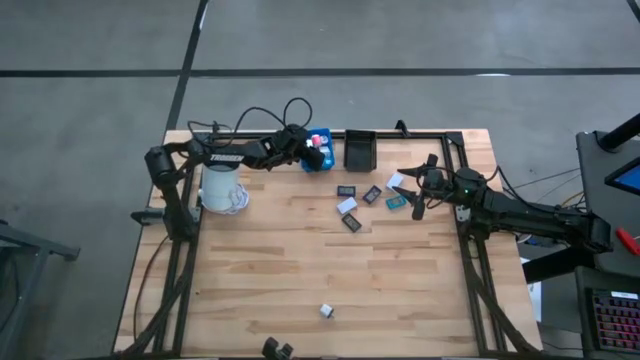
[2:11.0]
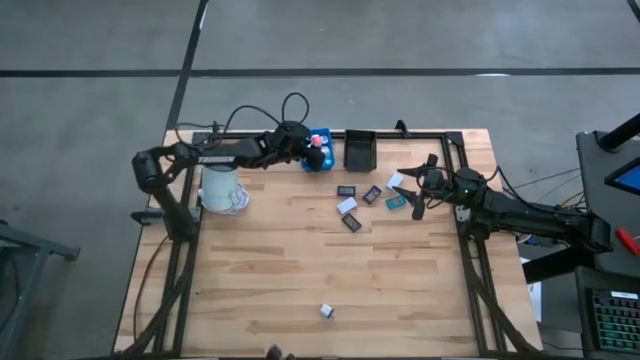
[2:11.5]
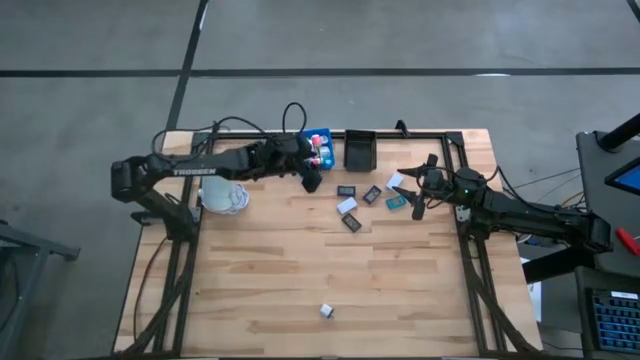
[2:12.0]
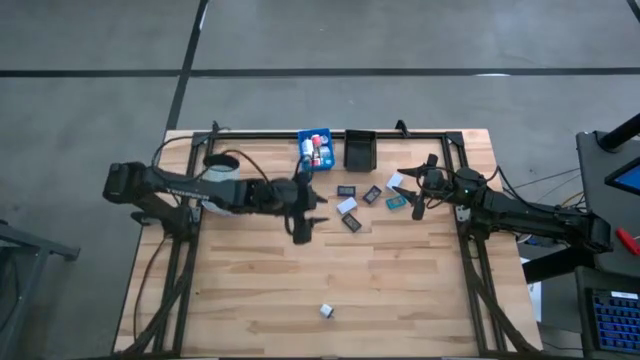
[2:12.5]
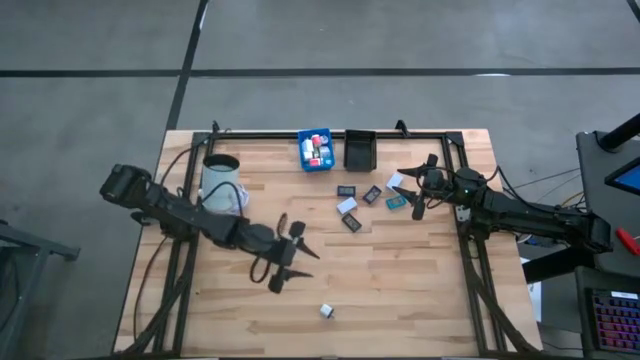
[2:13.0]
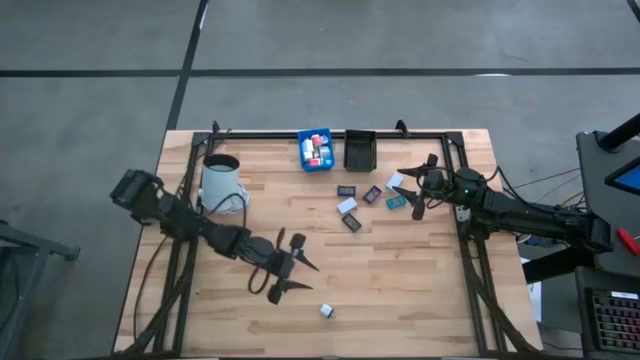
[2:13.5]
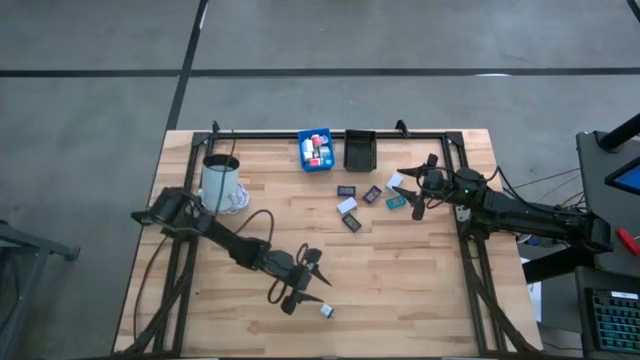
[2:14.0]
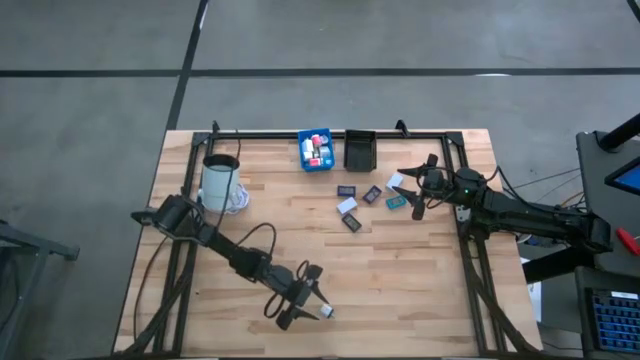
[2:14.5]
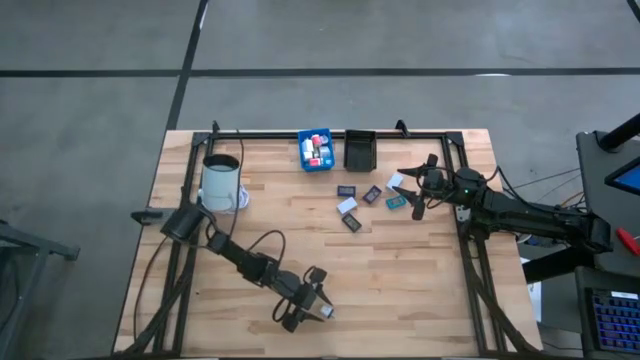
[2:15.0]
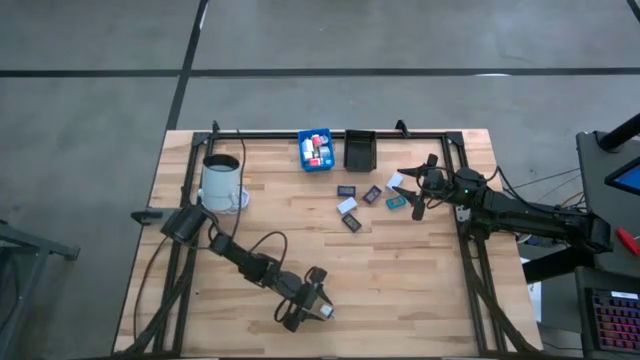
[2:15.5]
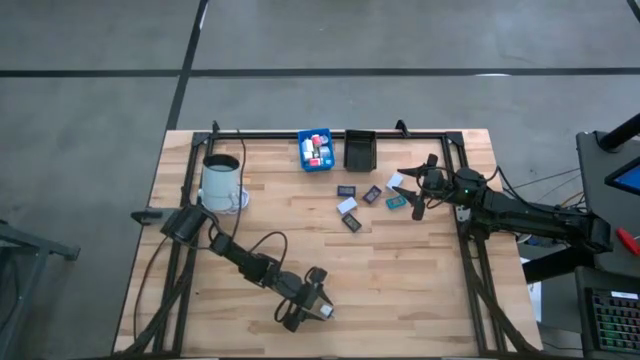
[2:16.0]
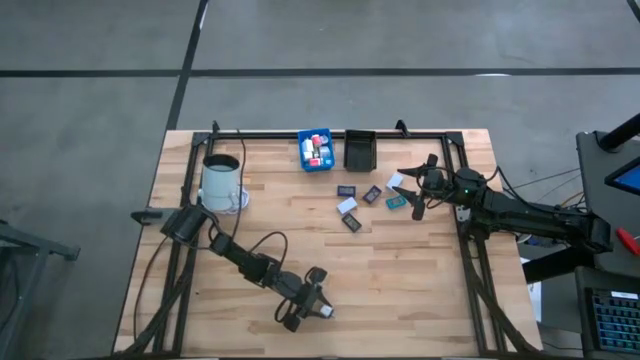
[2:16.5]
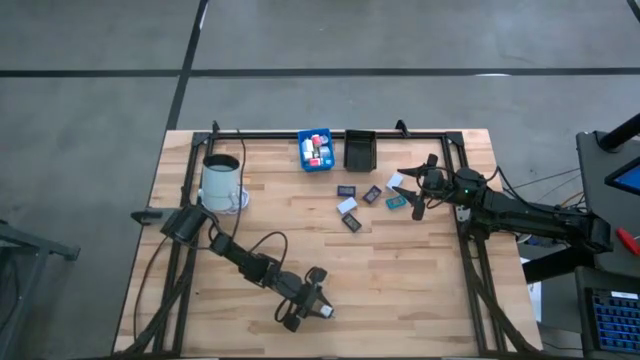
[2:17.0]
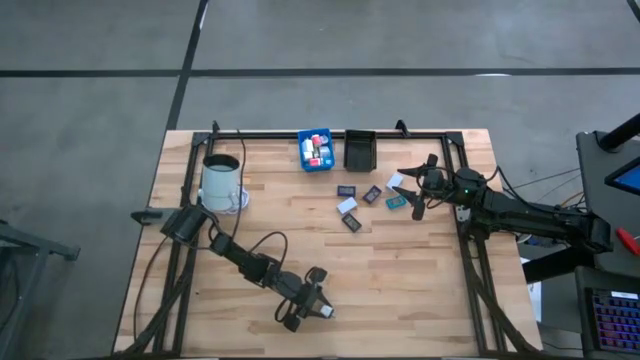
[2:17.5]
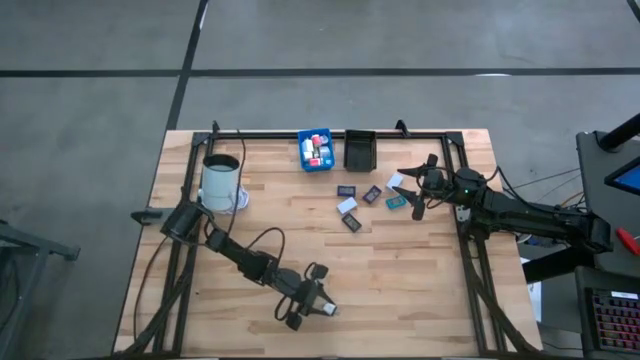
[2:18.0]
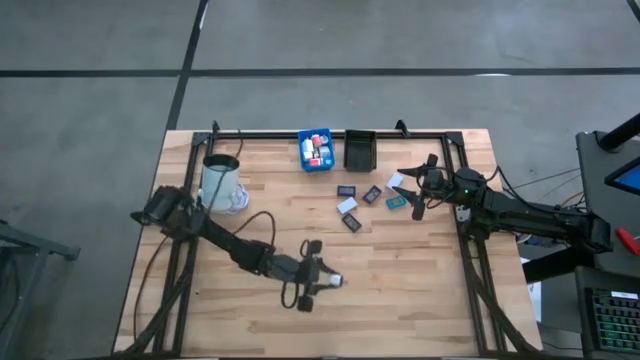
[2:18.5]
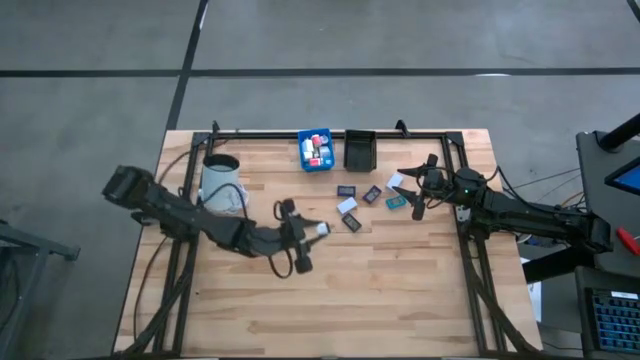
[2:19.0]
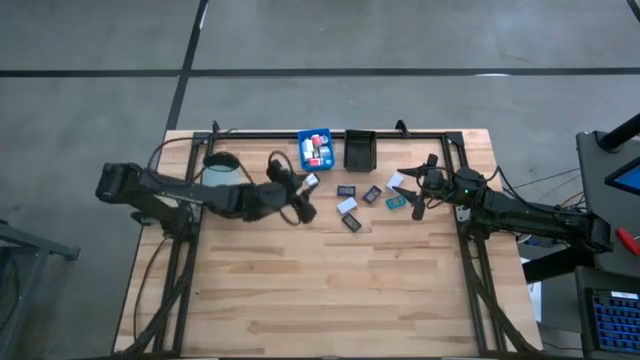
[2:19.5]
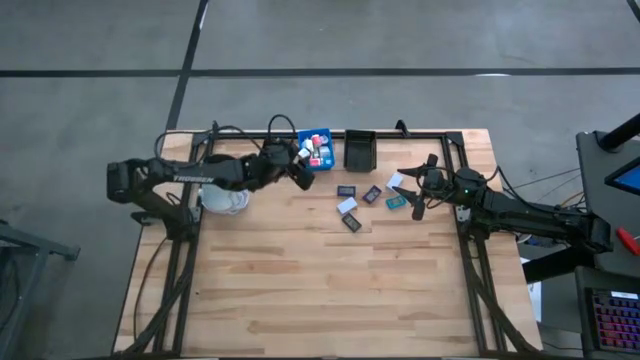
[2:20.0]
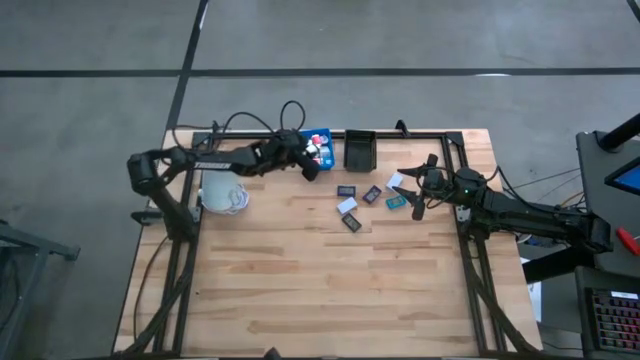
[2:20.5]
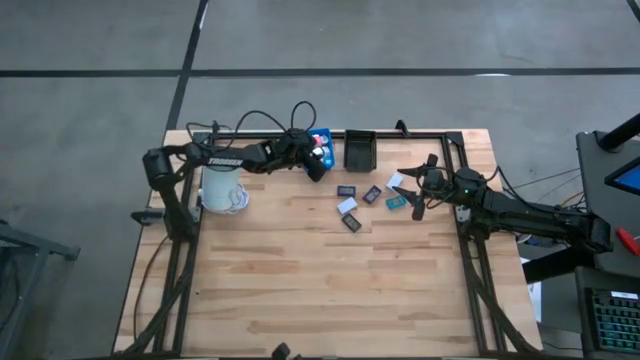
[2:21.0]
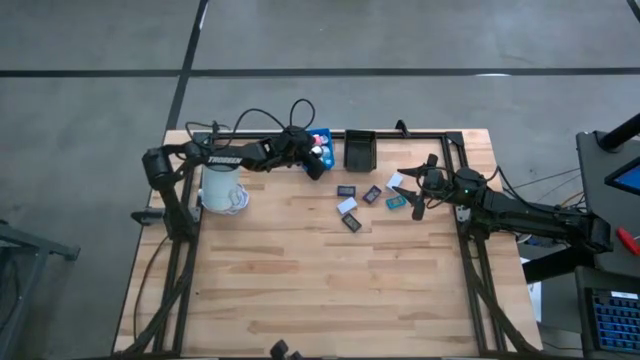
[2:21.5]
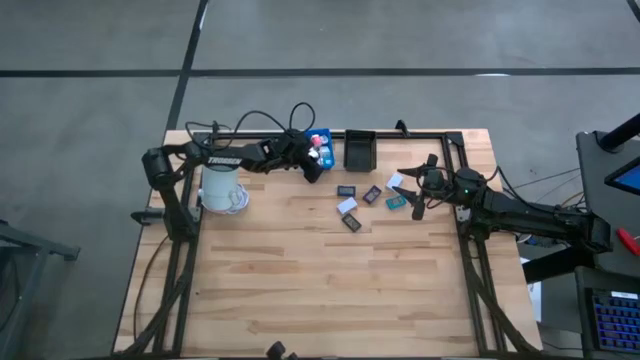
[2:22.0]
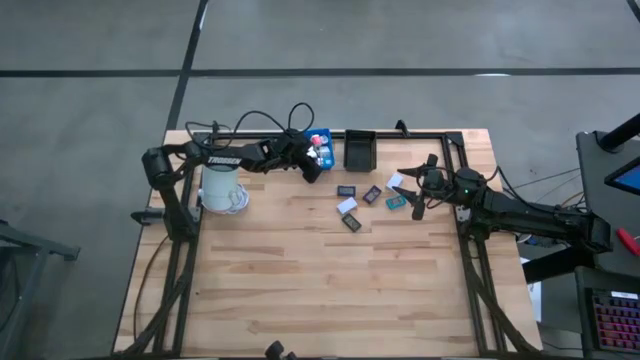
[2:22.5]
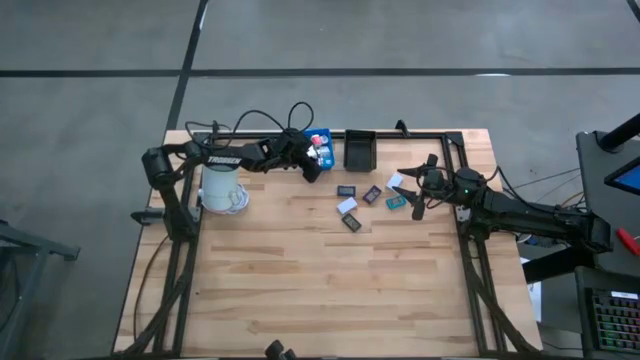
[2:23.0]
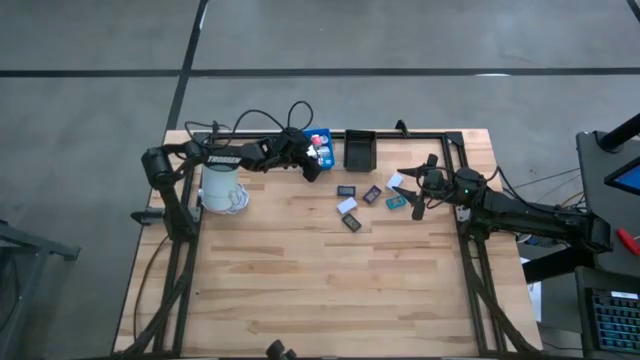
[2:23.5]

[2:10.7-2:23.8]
Task: Pick & Place Office items
Put the small white adapter into the blue basket

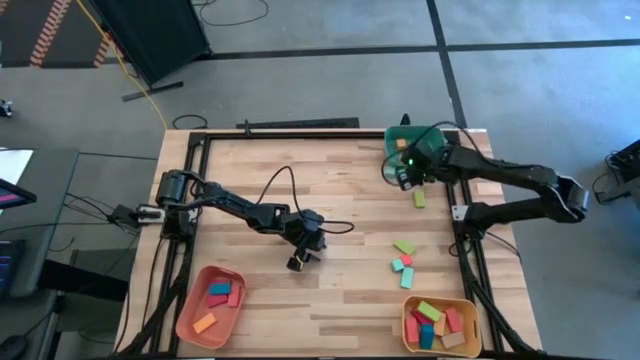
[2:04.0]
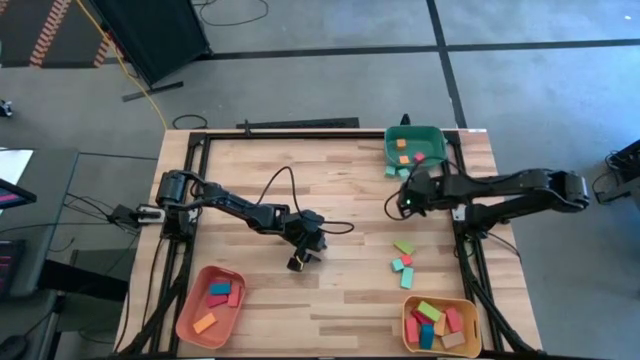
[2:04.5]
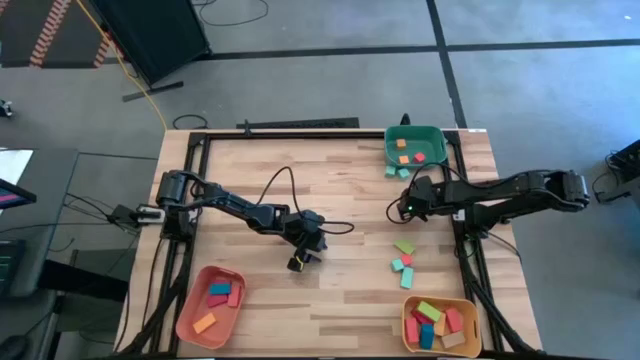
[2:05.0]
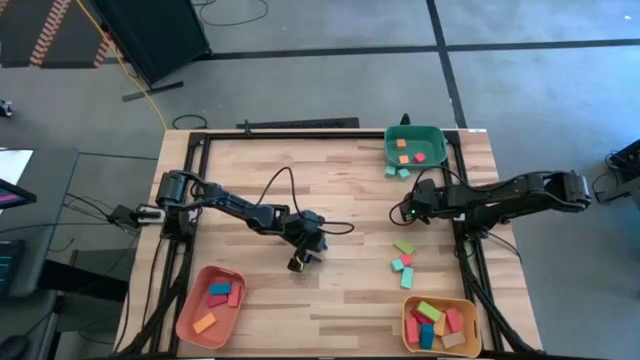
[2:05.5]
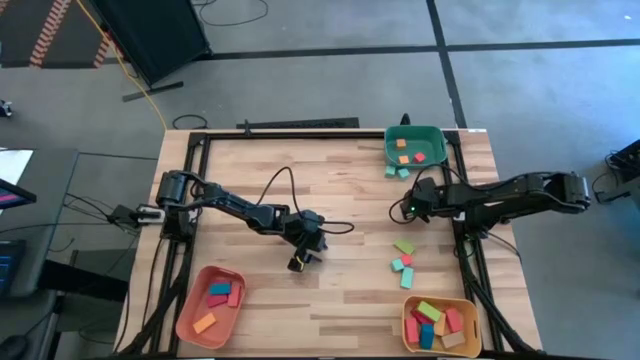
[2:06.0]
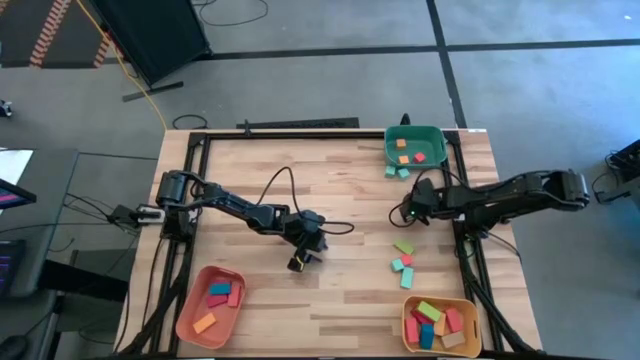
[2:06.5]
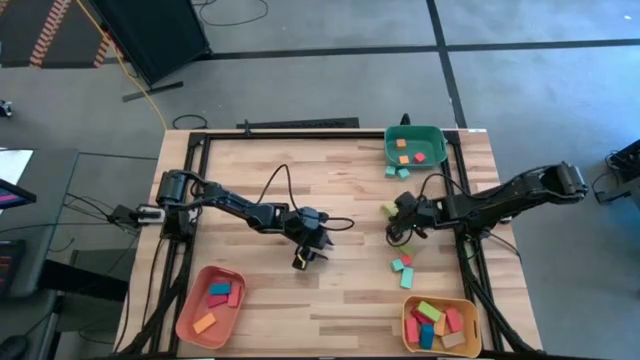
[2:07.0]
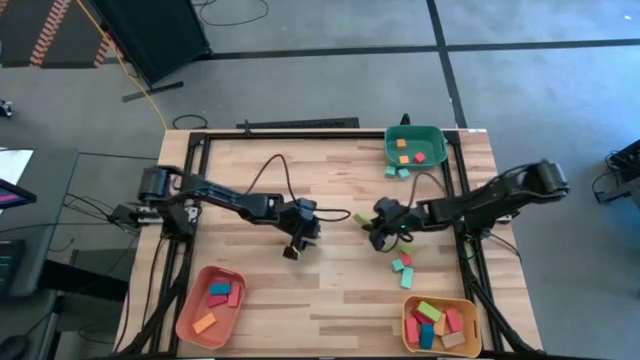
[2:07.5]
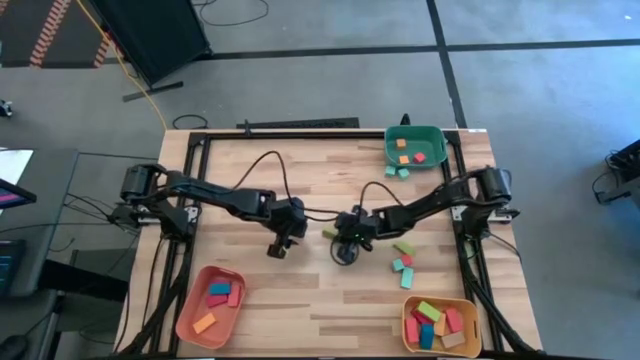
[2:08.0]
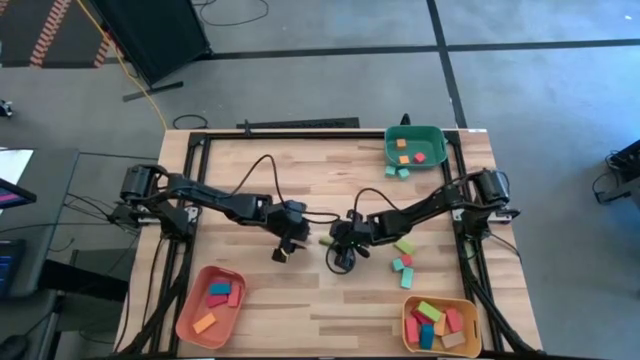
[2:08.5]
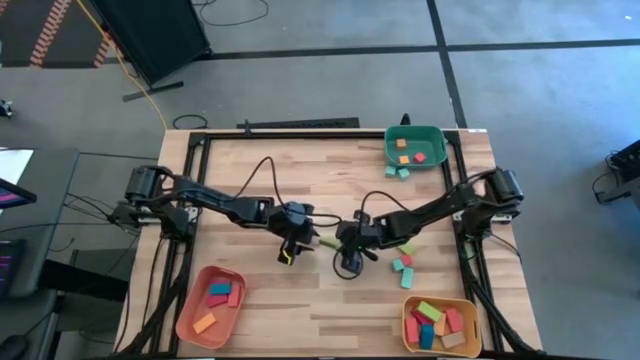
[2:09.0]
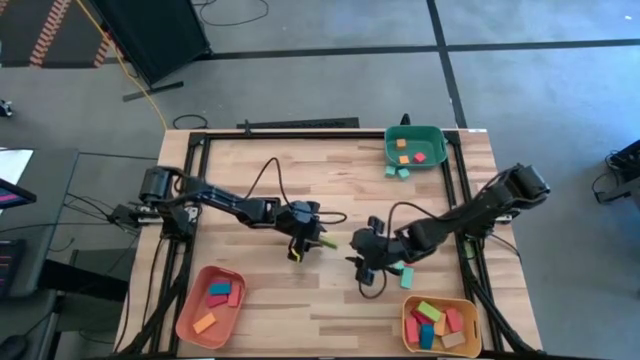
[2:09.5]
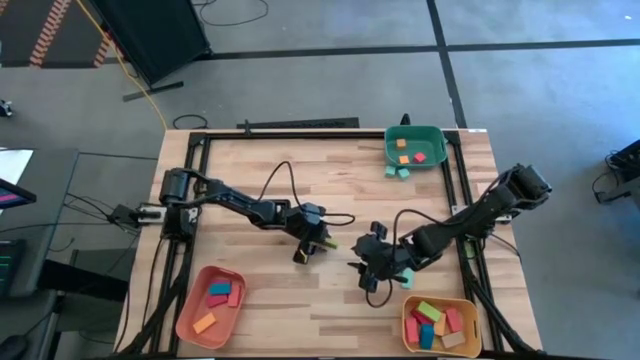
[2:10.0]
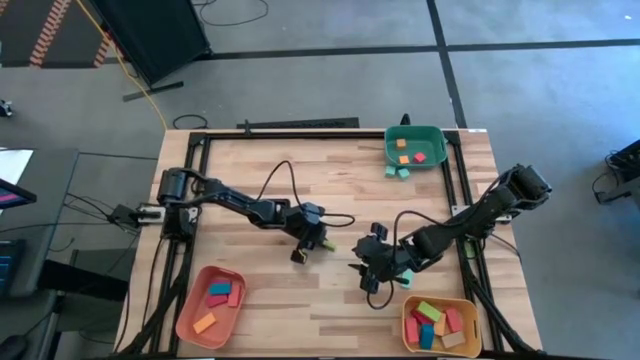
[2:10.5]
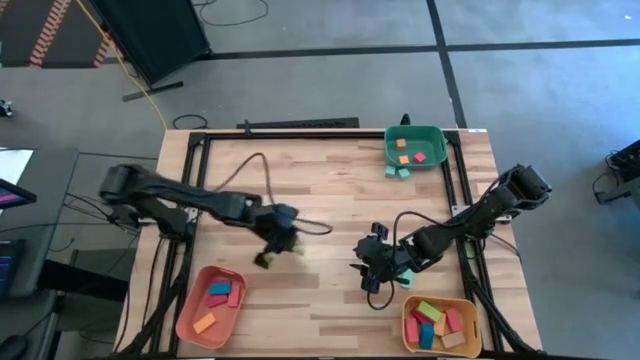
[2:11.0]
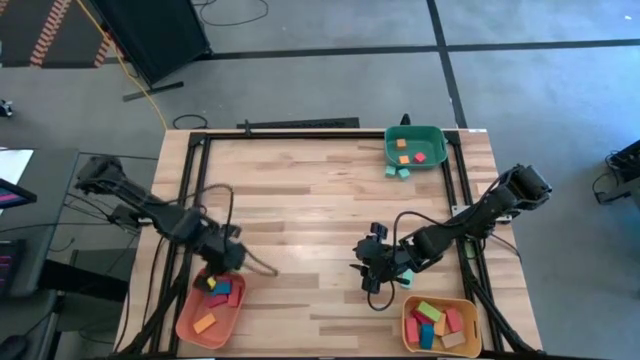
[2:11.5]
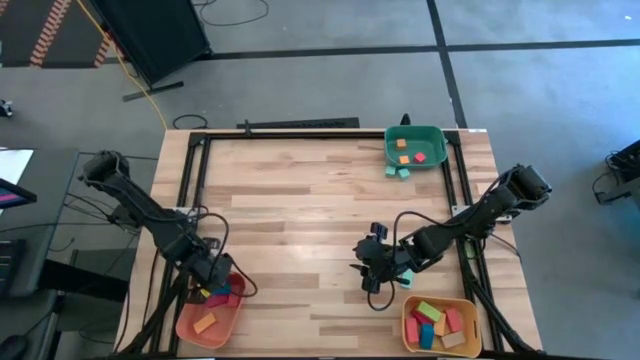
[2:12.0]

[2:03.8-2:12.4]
Task: Sort blocks by size
Put the medium green rectangular block into the orange bin
